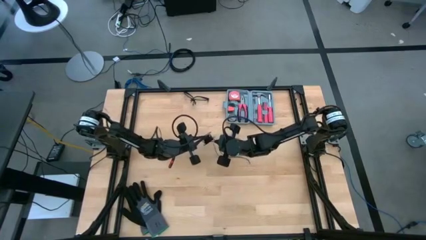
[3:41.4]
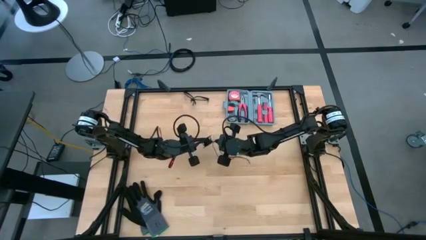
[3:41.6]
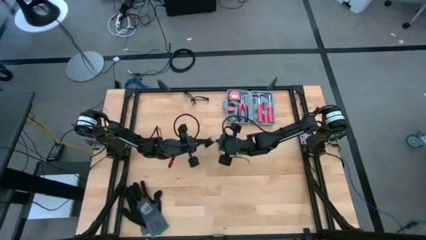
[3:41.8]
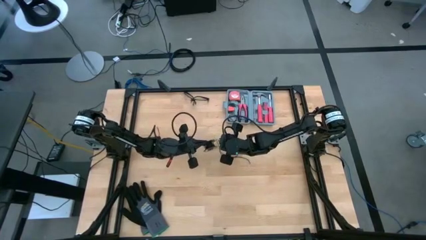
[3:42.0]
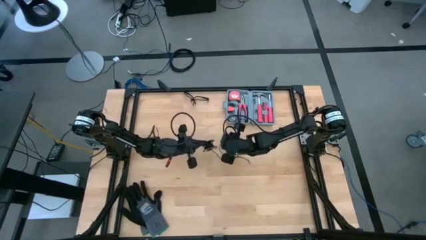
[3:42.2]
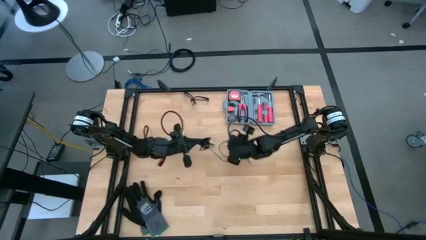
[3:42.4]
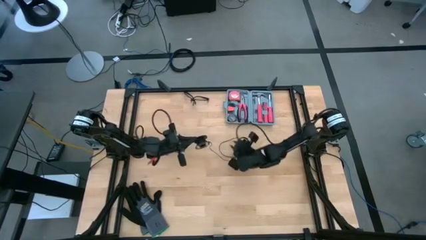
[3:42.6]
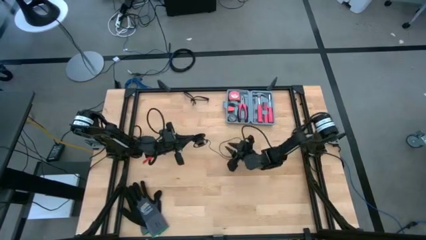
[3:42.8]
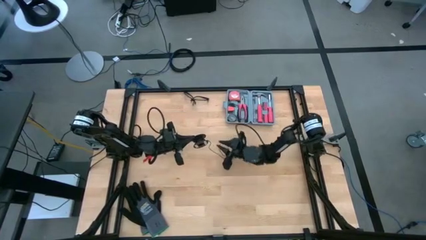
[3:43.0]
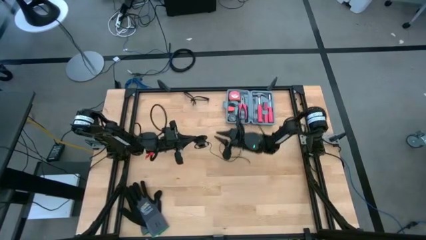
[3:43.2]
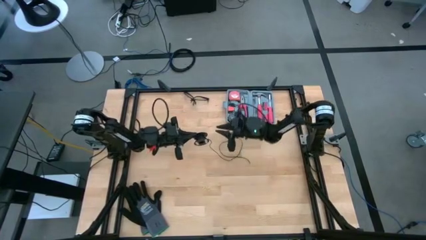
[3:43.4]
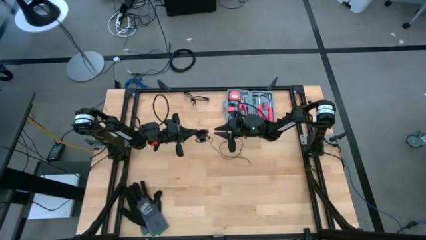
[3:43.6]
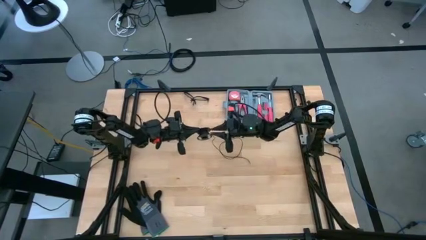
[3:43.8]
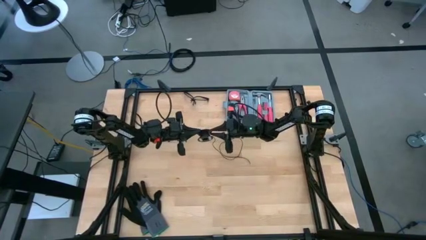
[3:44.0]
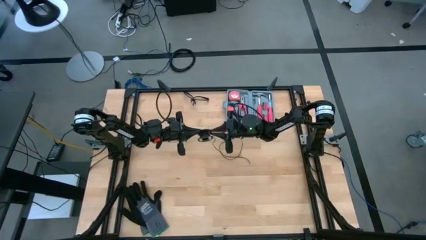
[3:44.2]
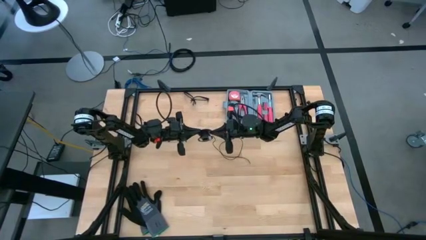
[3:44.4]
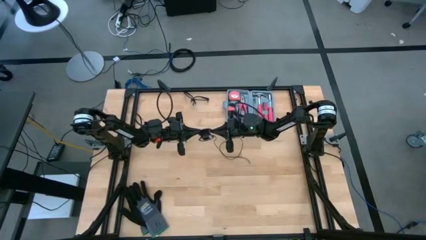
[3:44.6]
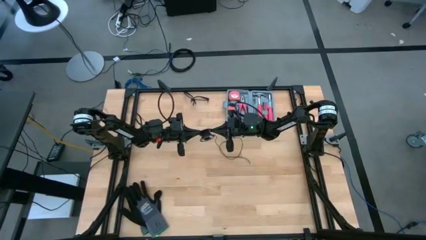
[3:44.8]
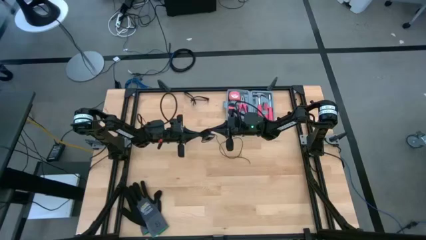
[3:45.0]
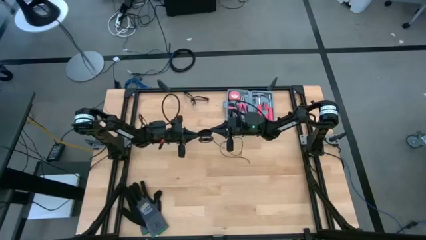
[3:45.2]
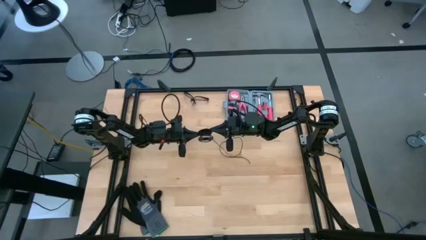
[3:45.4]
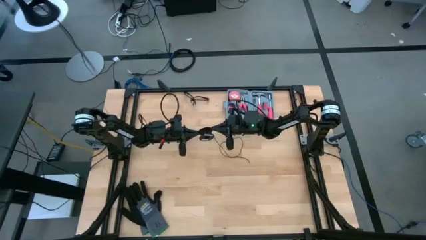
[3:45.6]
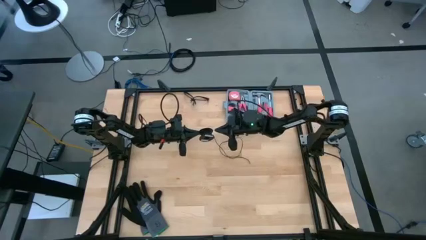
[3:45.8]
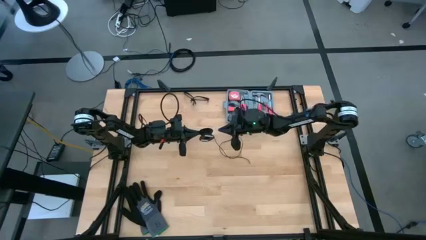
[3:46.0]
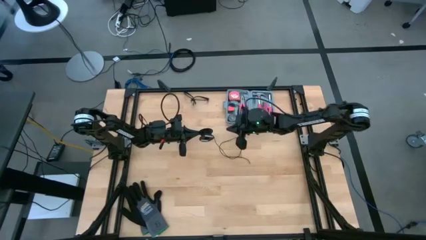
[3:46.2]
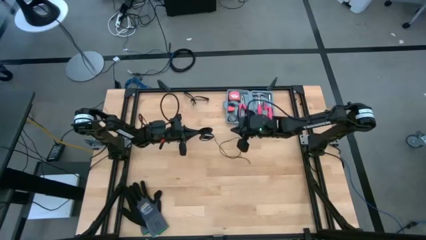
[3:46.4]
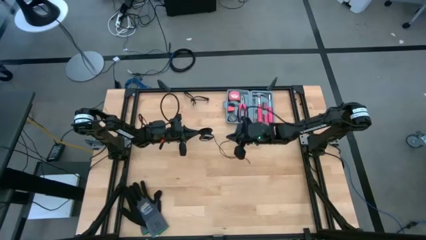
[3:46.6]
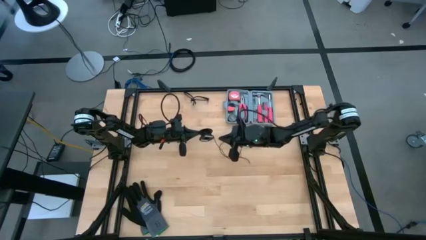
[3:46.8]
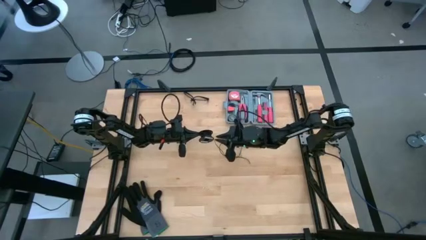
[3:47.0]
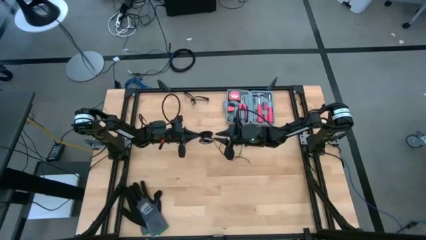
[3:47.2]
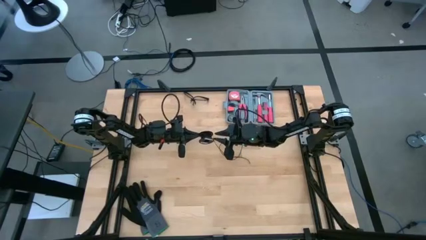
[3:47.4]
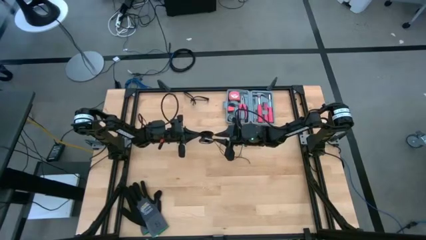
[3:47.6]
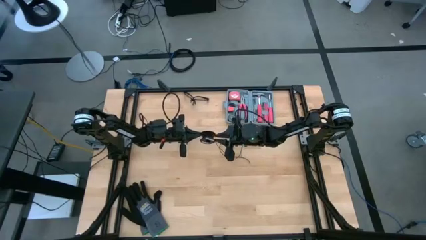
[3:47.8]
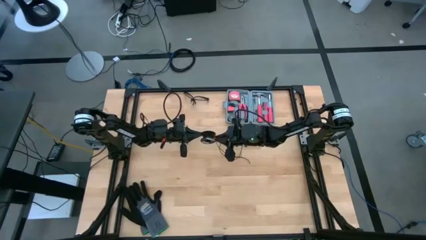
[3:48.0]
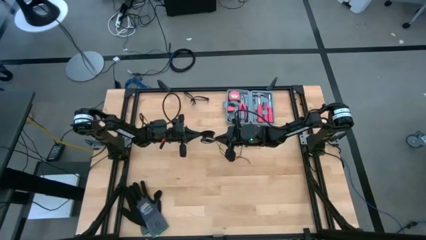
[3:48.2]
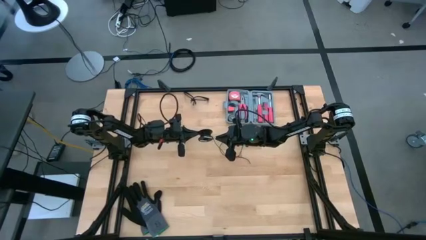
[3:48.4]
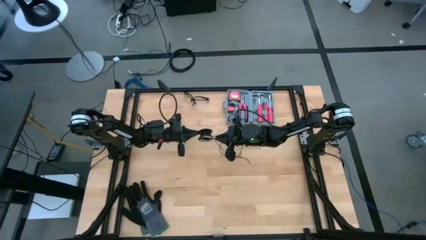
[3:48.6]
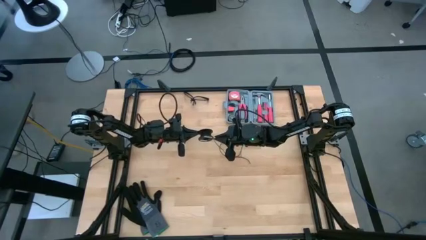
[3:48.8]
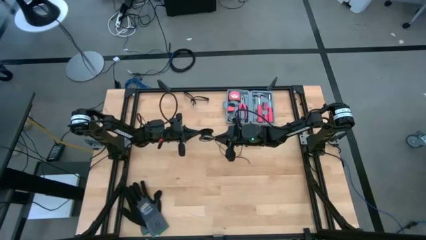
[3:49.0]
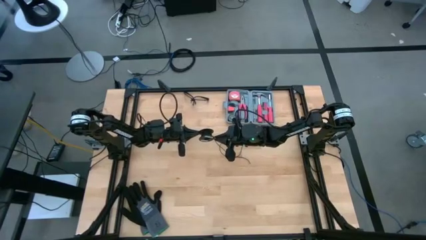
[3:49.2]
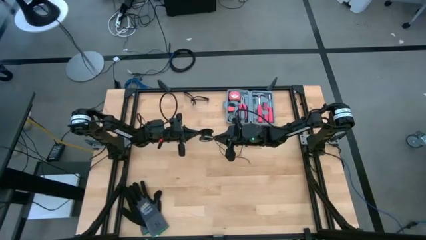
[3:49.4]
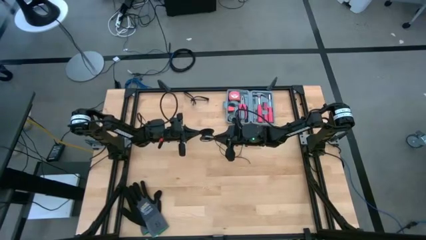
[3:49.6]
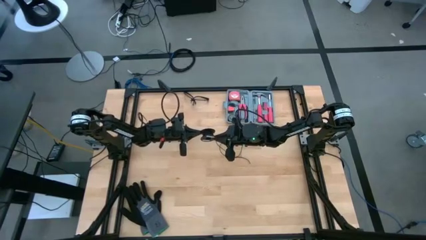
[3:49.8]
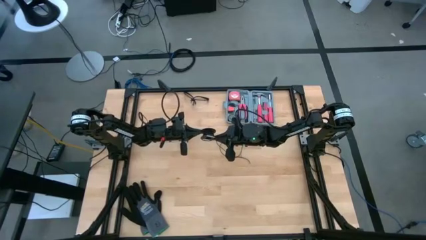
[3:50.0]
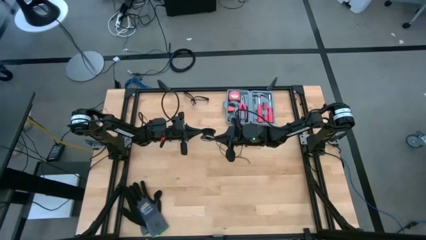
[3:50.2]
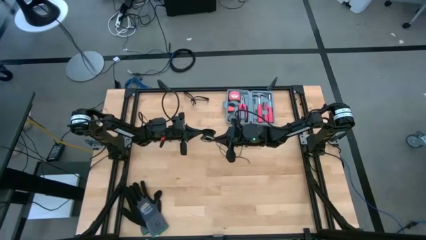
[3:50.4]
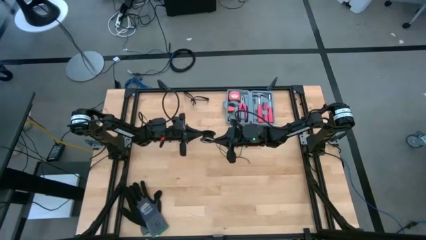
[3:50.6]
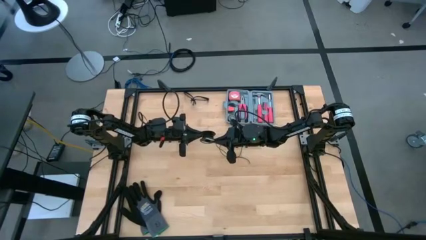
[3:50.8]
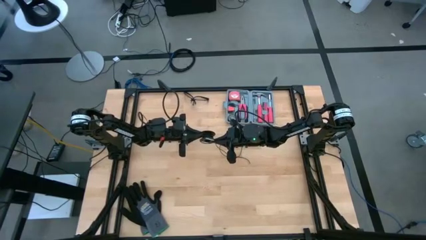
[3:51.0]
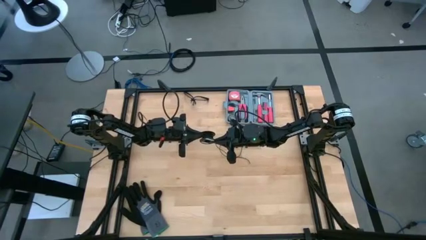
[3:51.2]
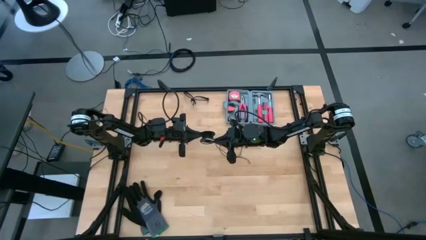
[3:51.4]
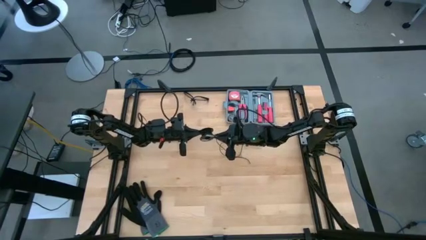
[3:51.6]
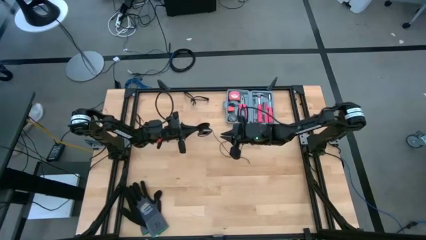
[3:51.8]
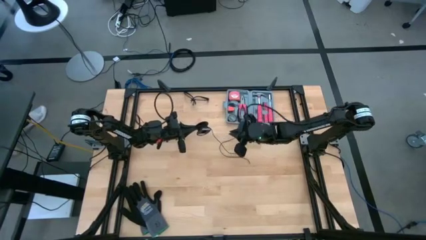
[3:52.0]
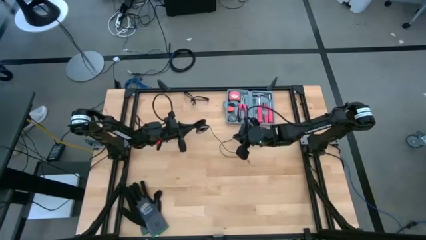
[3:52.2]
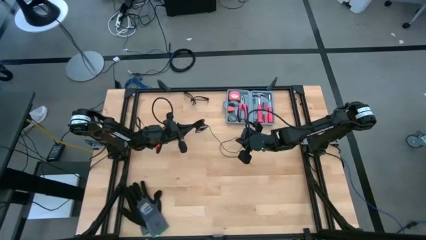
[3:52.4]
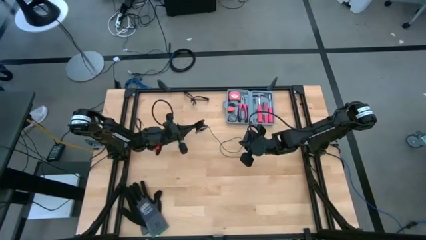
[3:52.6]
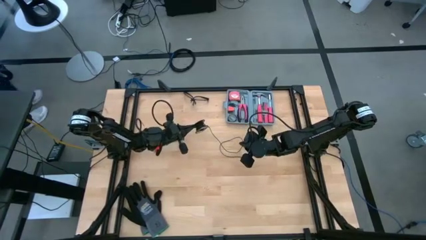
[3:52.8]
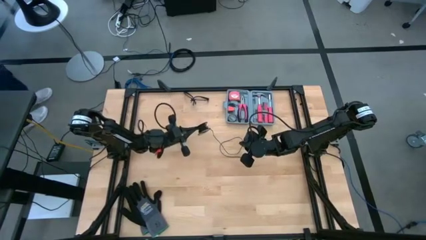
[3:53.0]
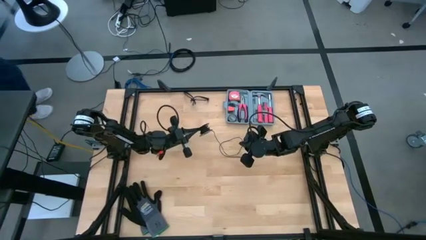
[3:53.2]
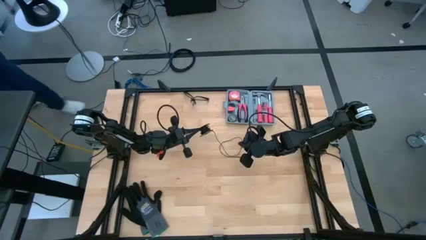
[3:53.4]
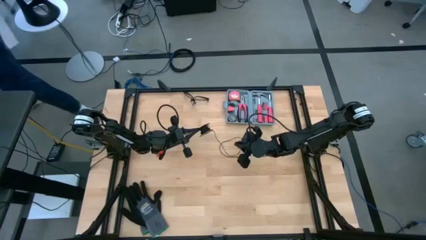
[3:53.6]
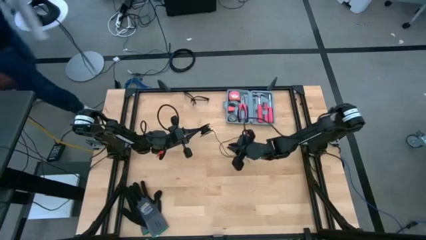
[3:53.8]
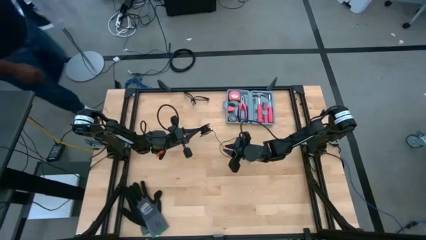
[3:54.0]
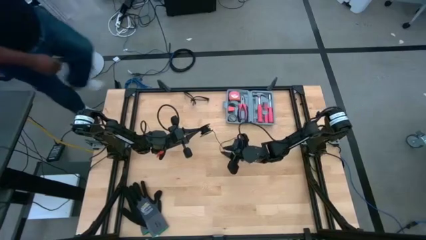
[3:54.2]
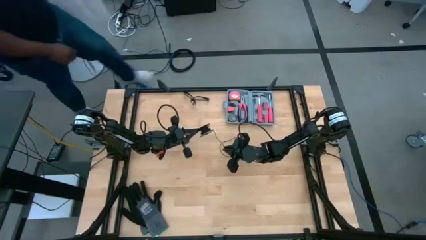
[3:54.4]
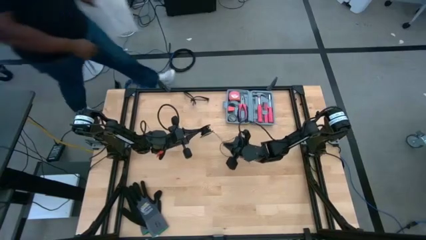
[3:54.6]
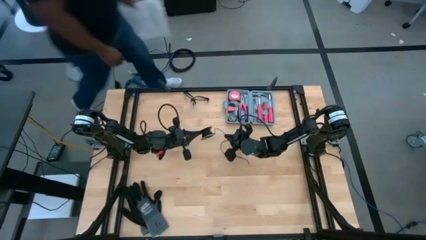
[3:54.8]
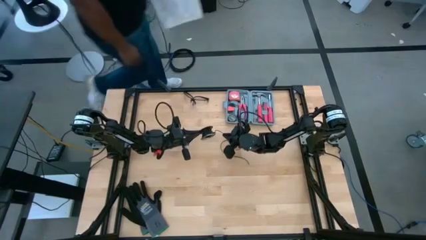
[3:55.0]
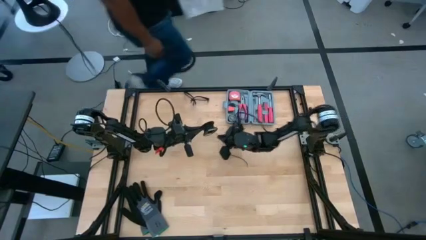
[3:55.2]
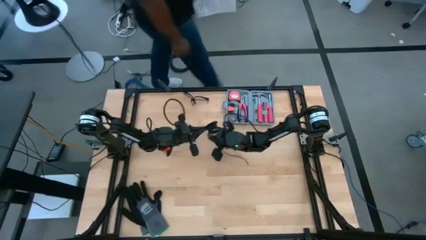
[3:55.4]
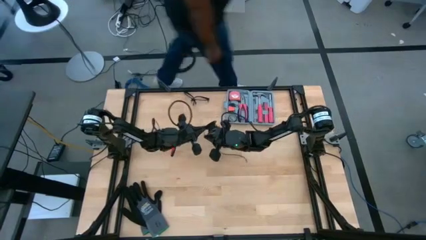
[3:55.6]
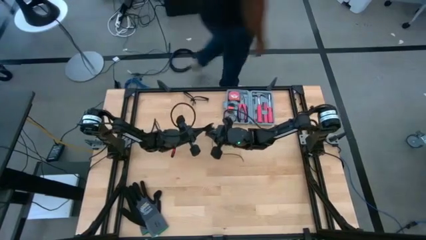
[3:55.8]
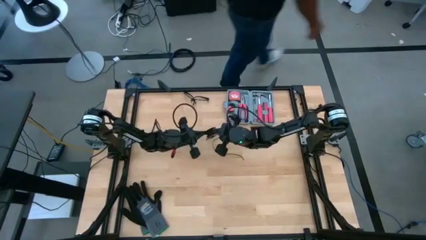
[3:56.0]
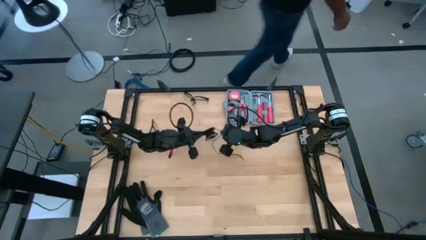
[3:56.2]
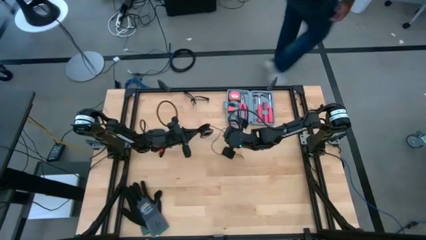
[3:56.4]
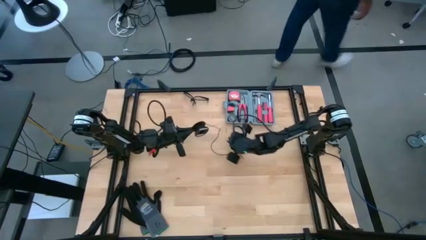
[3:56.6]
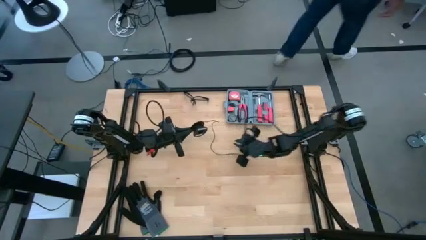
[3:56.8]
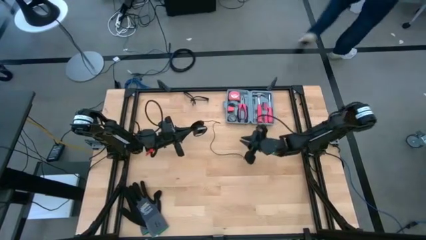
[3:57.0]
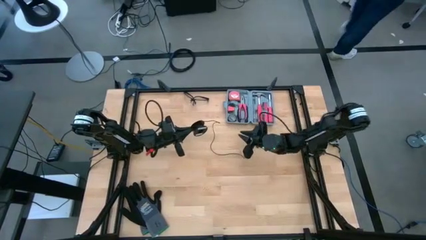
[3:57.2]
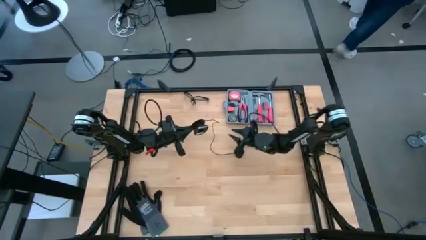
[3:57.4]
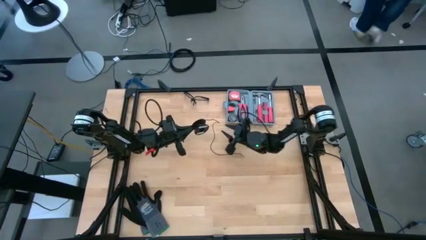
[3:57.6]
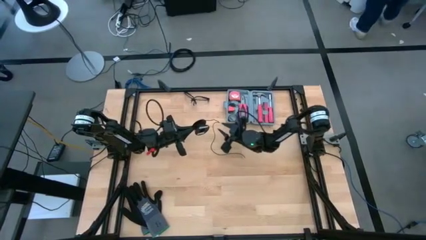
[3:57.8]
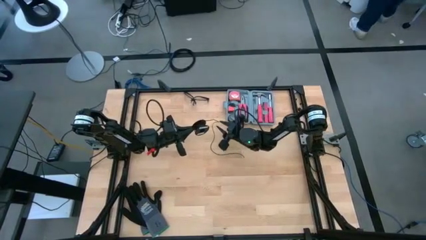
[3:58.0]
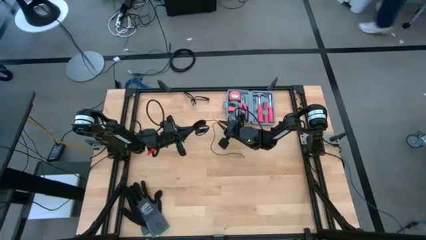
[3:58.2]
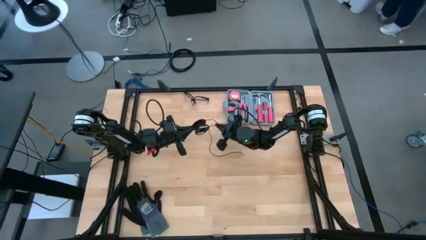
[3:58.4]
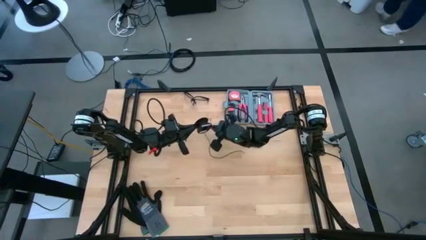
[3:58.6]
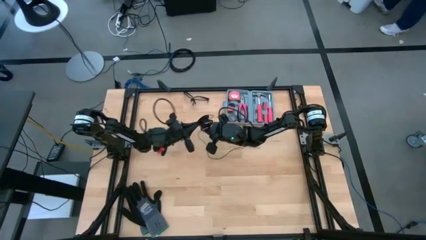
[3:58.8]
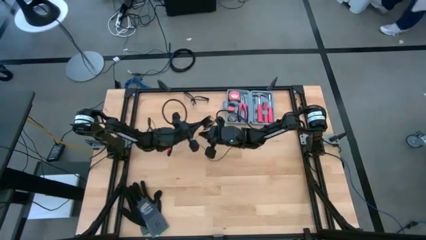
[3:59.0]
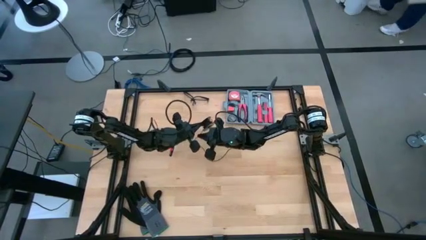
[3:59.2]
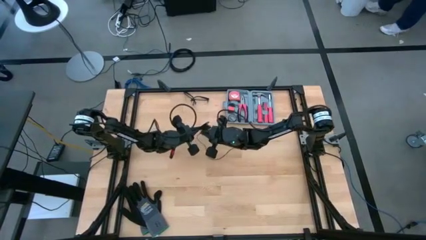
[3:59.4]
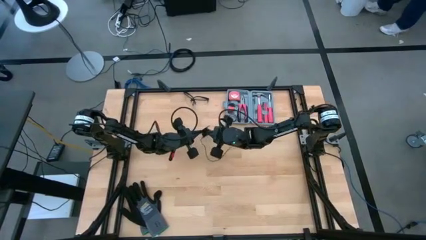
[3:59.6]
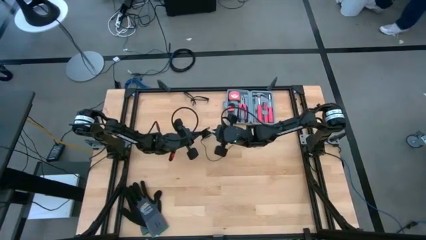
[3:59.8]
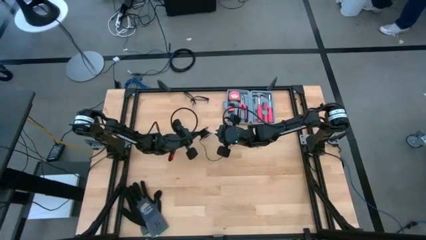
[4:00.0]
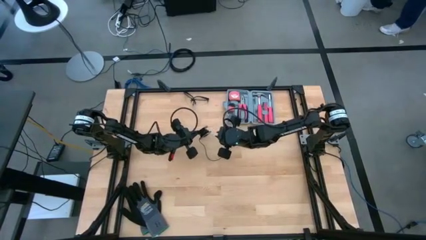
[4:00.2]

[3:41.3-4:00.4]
Task: Coil cords
Coil the black wire onto the spool
